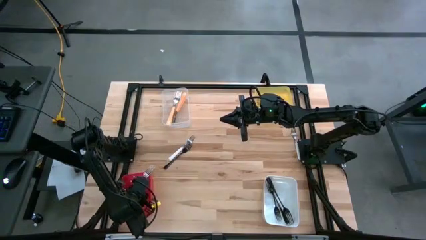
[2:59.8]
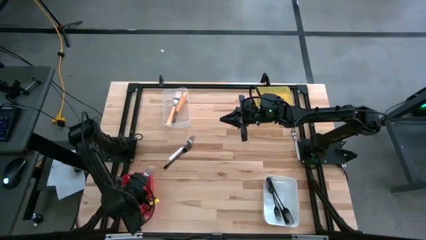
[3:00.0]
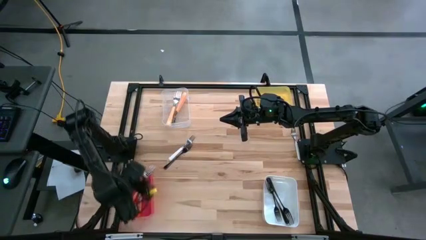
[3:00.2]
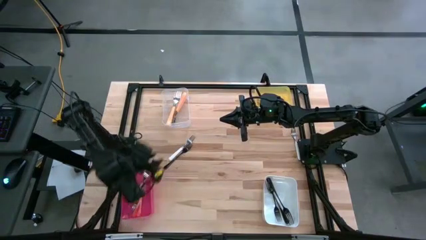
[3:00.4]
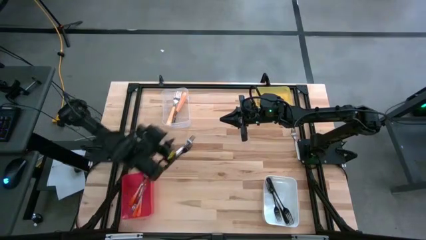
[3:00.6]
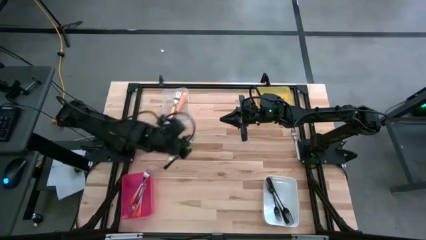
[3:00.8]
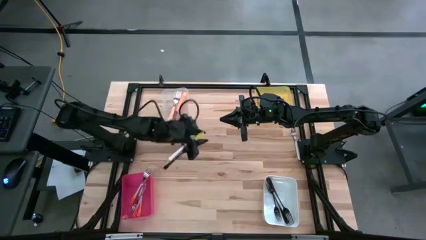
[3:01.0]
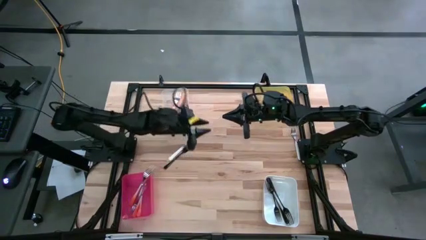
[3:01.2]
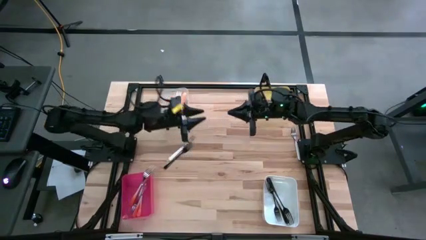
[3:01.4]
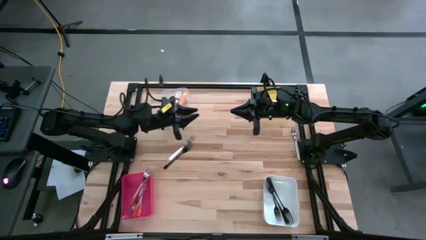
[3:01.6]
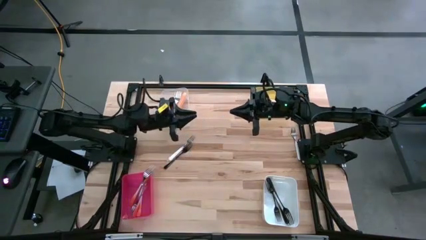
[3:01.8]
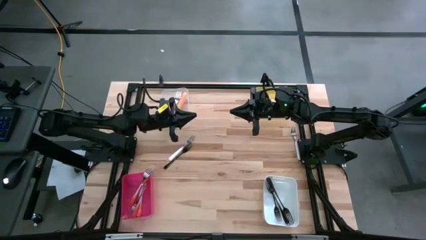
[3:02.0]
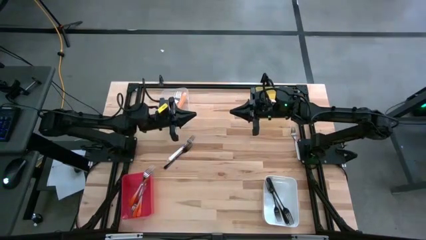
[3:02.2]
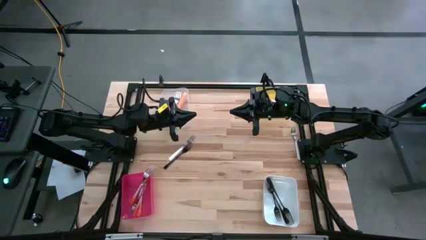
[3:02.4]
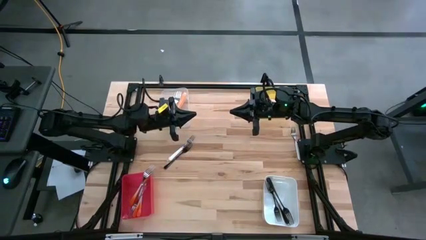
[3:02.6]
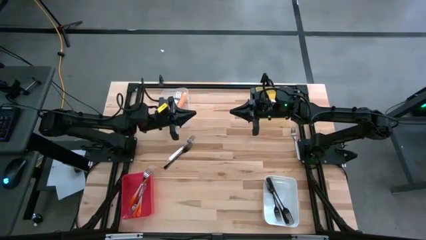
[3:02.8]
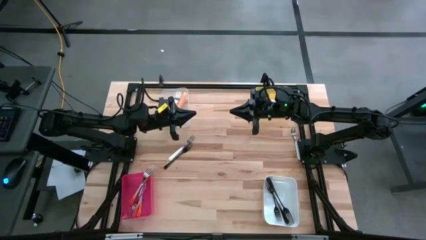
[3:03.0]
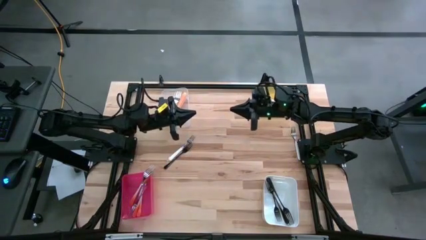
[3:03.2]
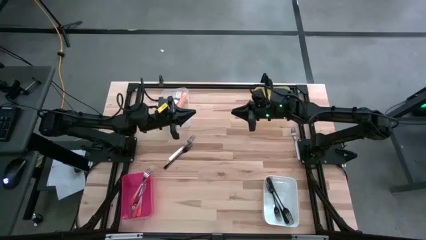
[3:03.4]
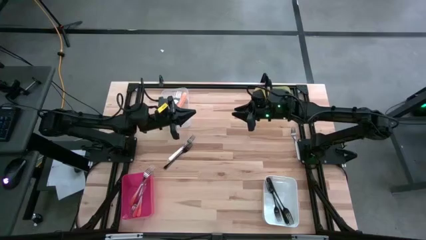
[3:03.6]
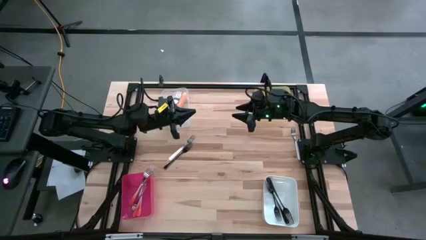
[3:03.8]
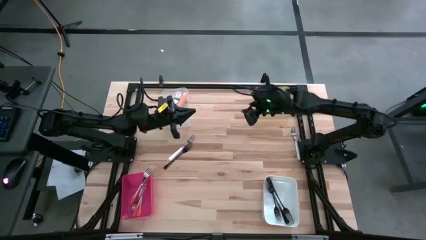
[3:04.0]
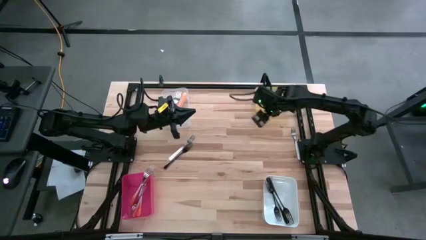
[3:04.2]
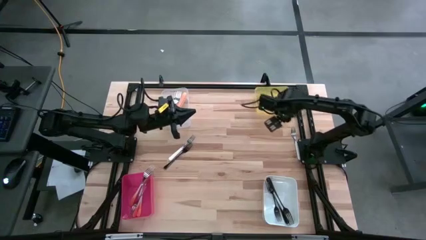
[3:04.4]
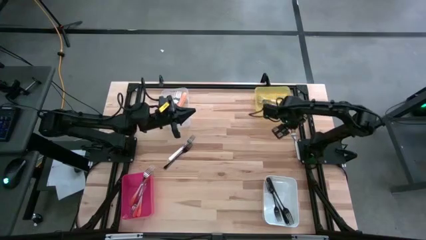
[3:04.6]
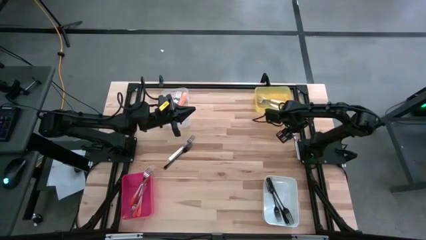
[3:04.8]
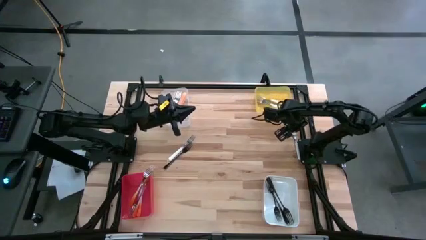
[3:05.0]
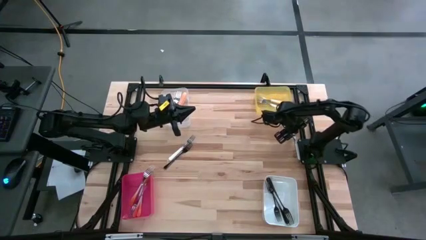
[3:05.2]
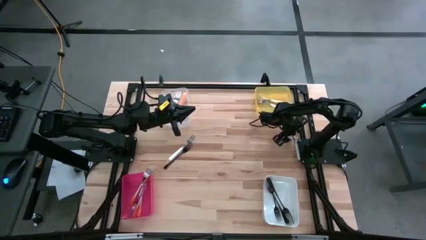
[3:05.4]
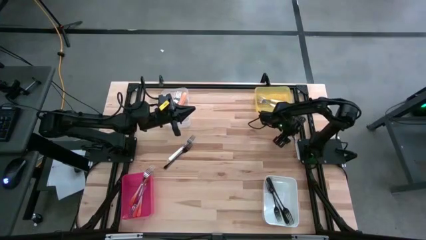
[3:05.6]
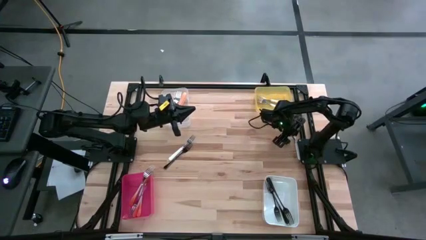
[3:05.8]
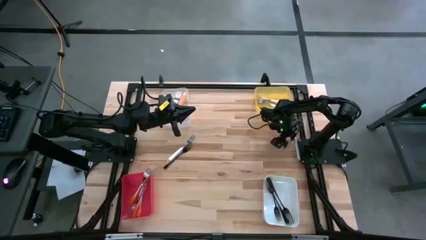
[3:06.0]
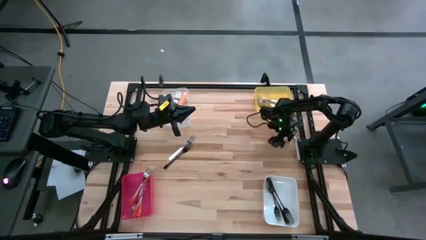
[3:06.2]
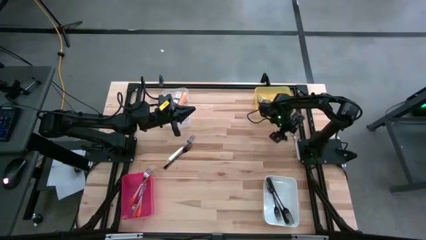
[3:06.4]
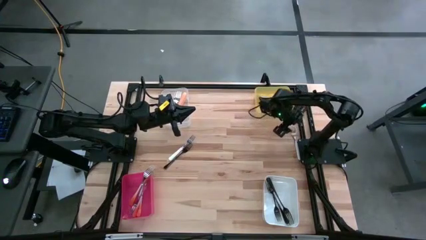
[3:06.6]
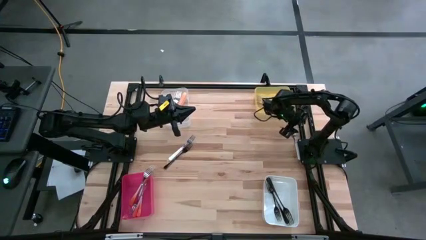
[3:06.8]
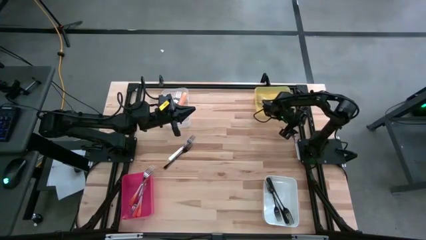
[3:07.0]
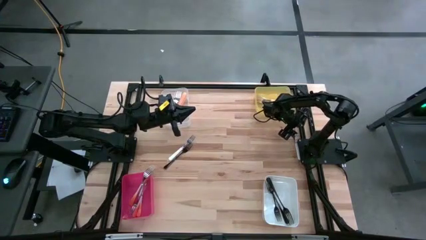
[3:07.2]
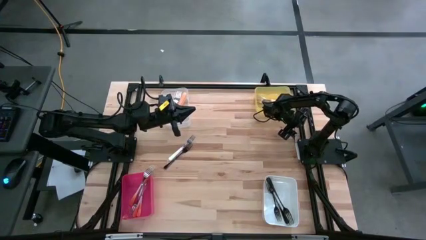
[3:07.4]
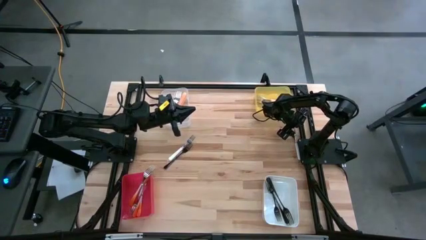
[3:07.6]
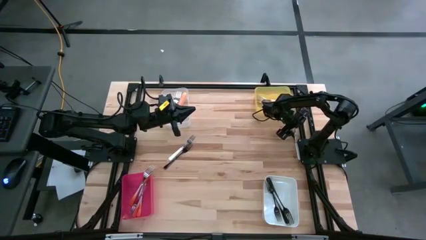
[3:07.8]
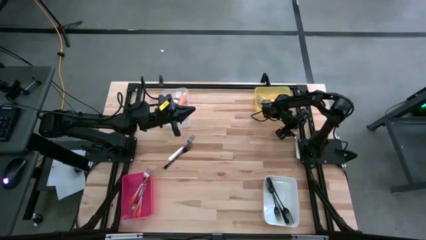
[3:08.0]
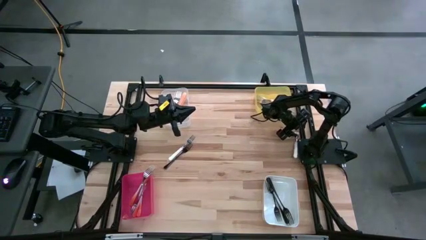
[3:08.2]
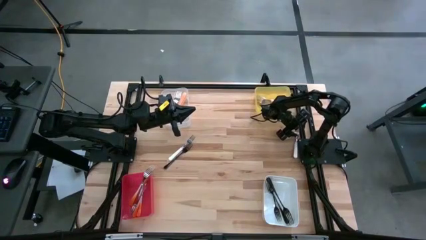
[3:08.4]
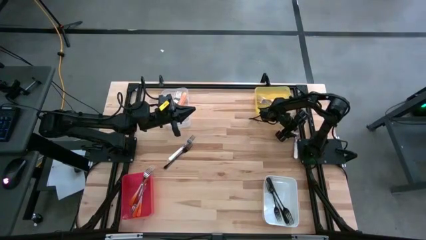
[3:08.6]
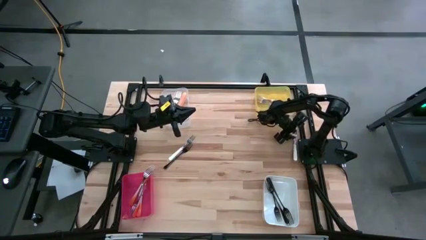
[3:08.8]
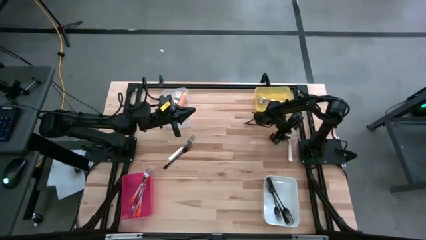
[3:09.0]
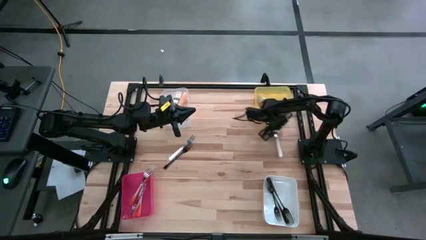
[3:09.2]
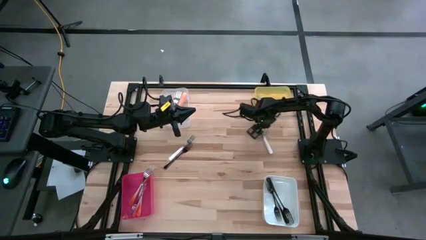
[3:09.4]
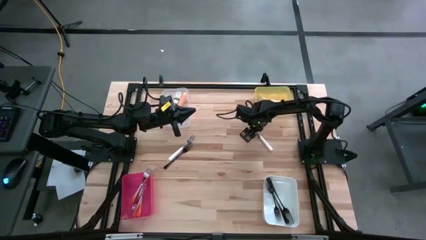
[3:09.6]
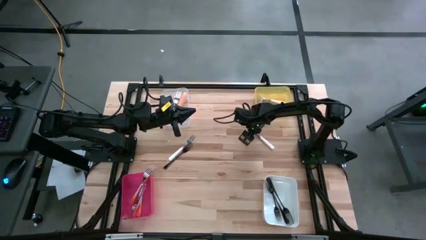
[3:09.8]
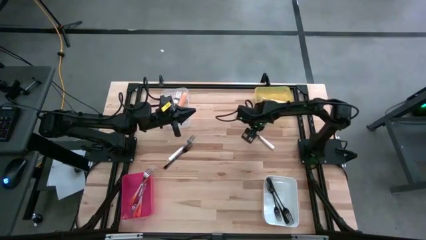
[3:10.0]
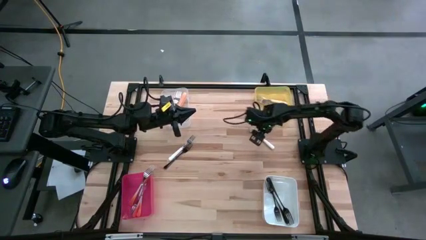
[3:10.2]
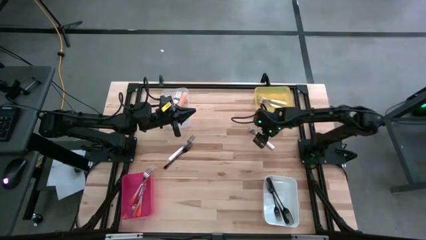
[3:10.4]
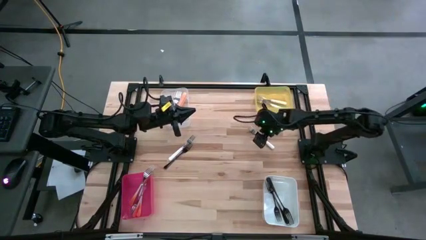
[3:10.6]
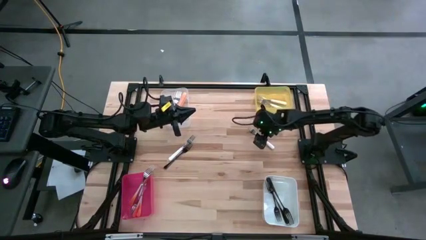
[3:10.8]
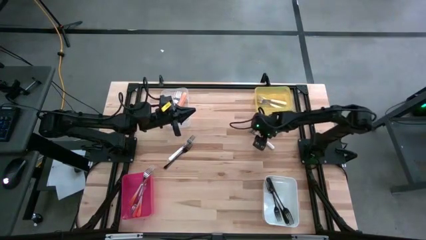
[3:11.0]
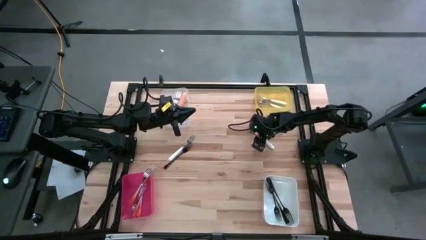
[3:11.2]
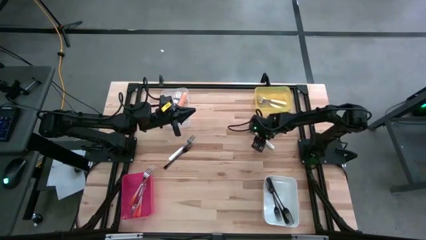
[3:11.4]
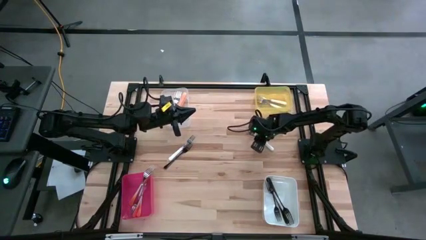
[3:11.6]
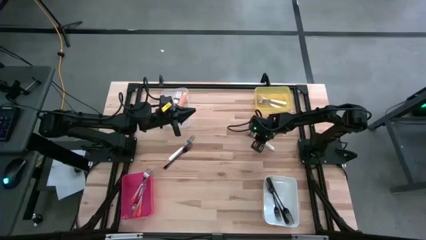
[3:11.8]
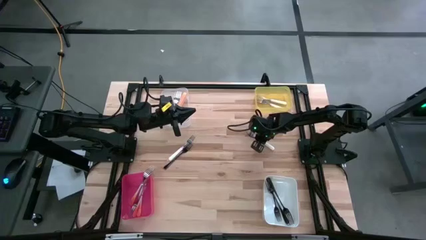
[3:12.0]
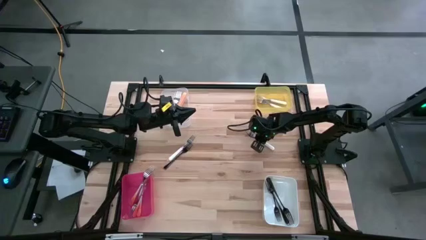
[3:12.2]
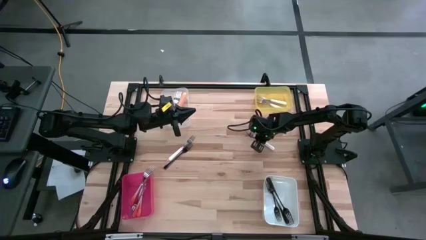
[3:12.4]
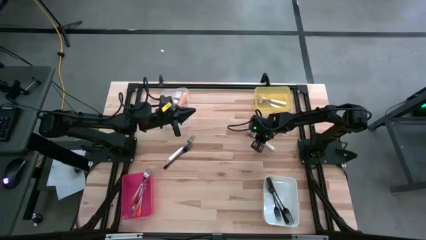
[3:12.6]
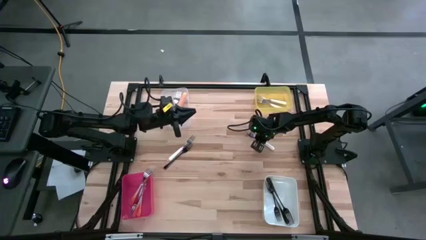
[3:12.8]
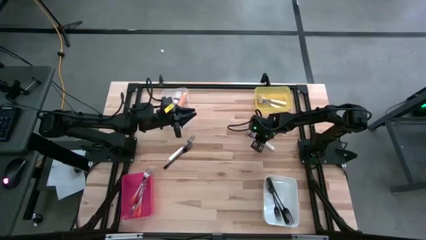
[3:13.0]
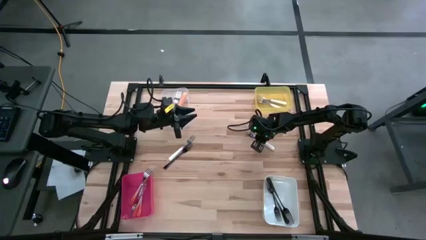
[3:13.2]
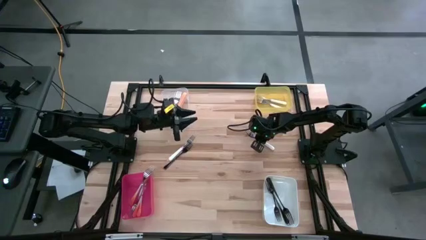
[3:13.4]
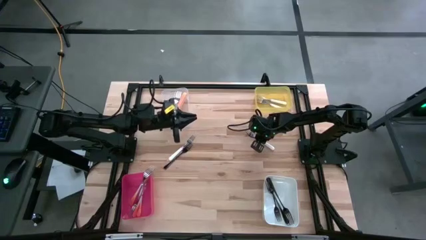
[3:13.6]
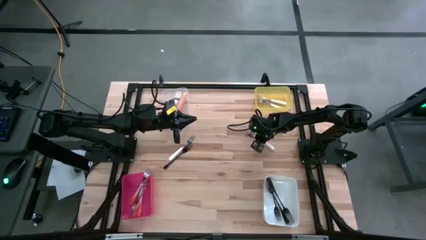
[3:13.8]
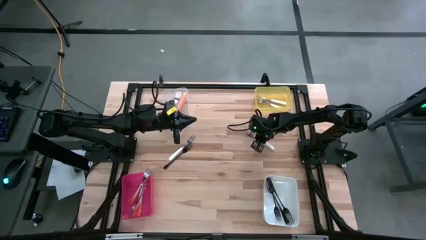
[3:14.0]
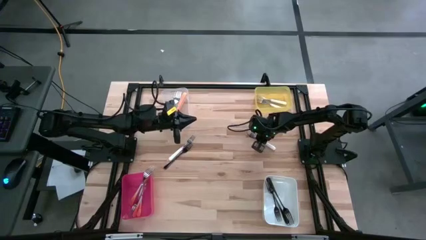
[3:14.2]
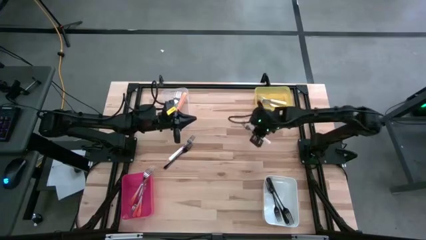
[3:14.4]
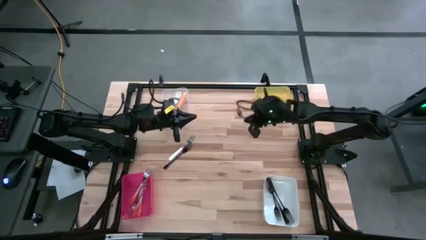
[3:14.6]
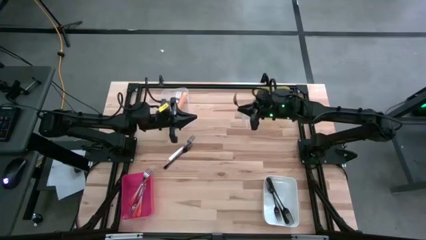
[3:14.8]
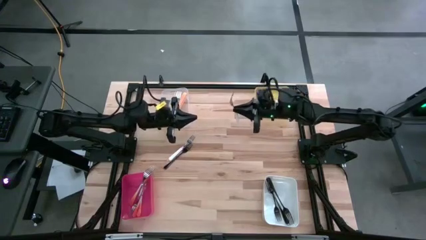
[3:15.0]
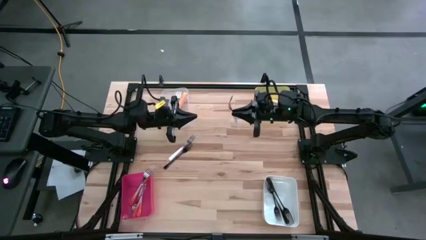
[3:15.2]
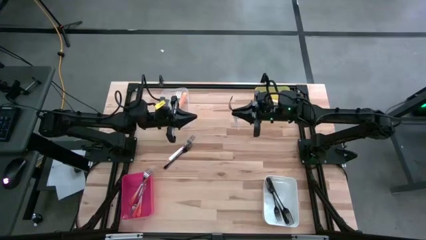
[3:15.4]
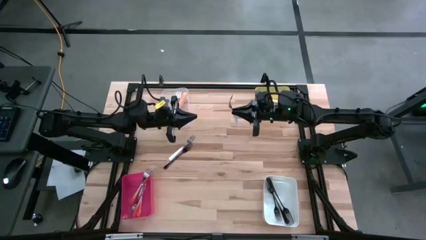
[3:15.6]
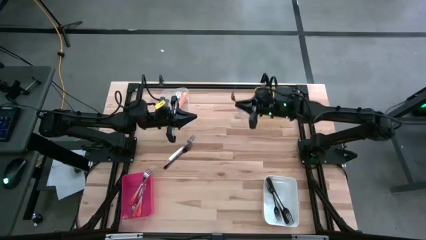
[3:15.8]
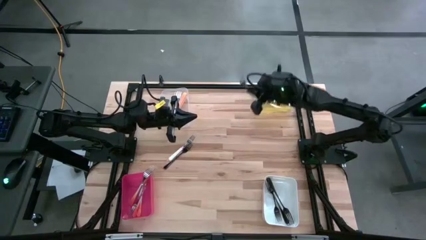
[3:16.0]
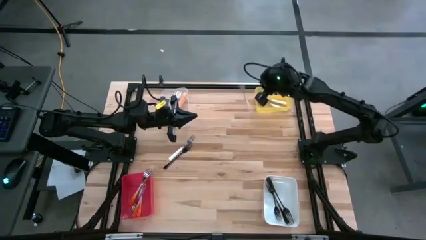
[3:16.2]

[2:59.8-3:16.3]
Task: Sort silverware by color (type)
Put the white fork into the yellow bin
